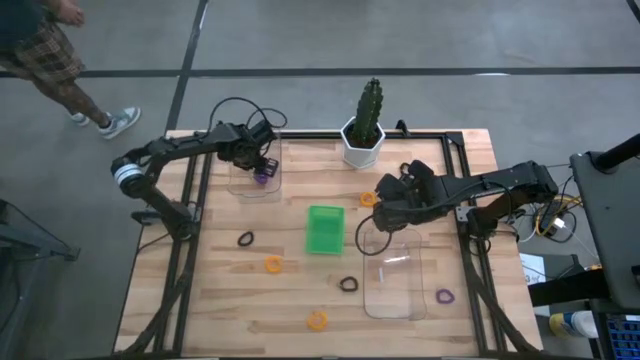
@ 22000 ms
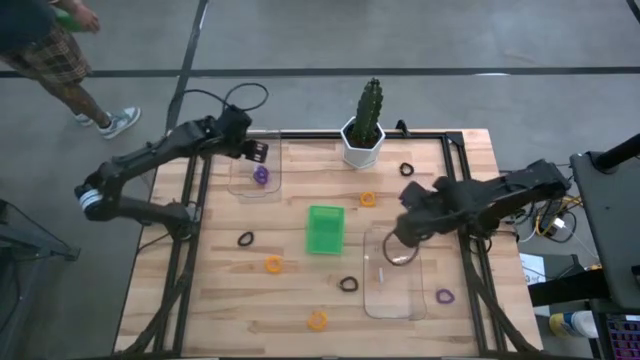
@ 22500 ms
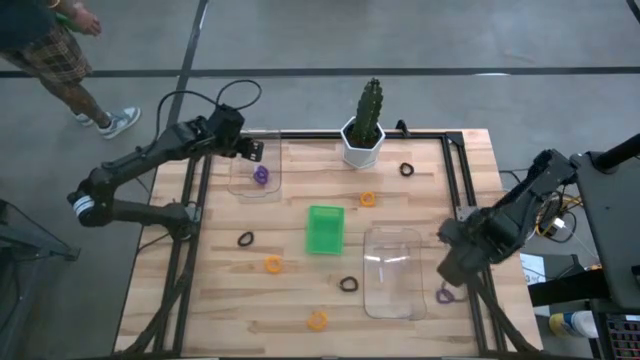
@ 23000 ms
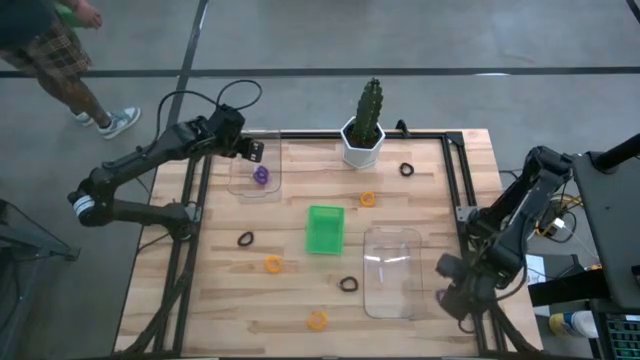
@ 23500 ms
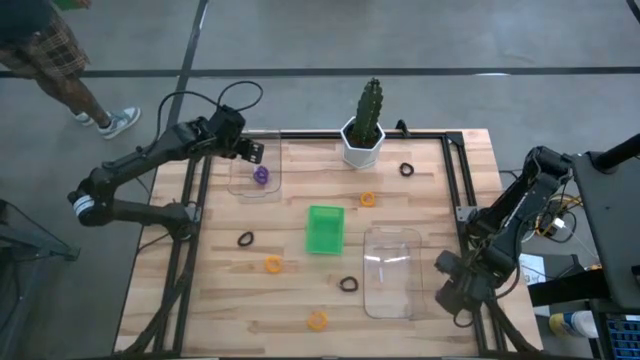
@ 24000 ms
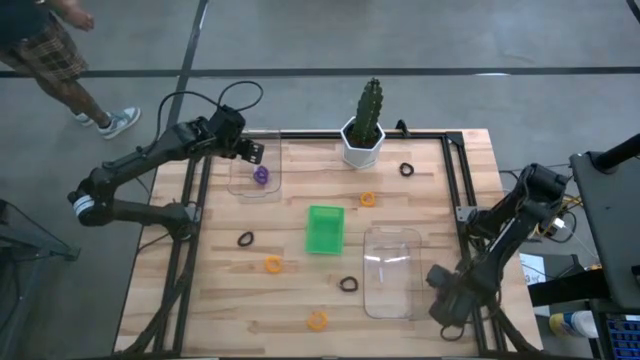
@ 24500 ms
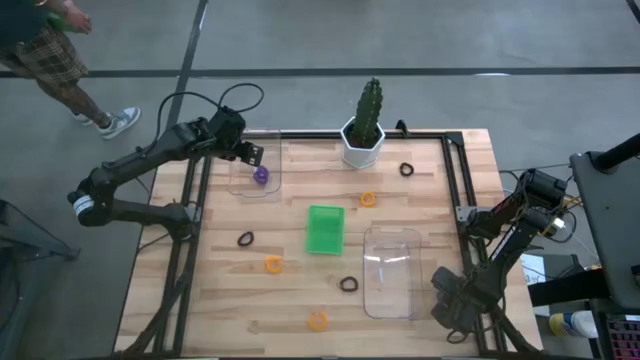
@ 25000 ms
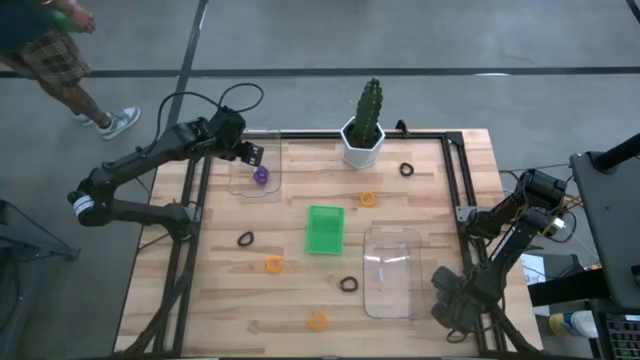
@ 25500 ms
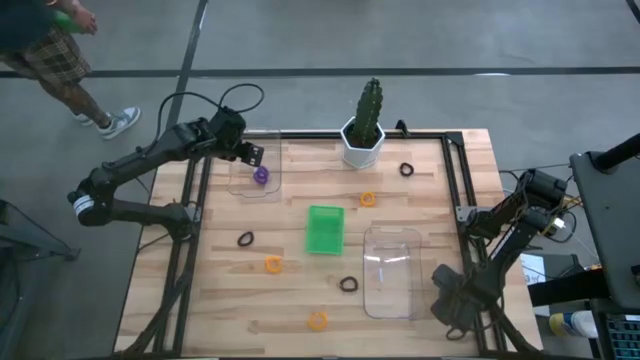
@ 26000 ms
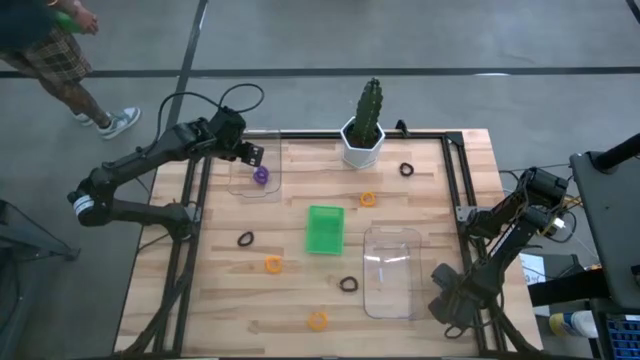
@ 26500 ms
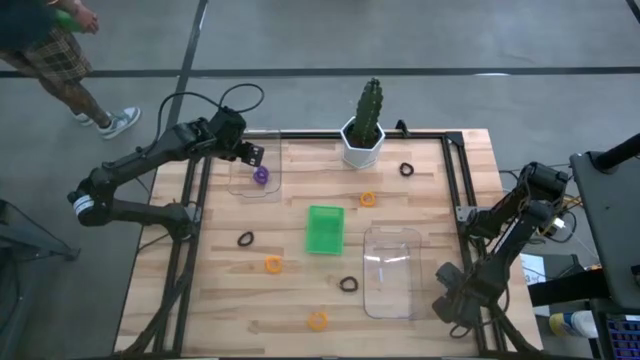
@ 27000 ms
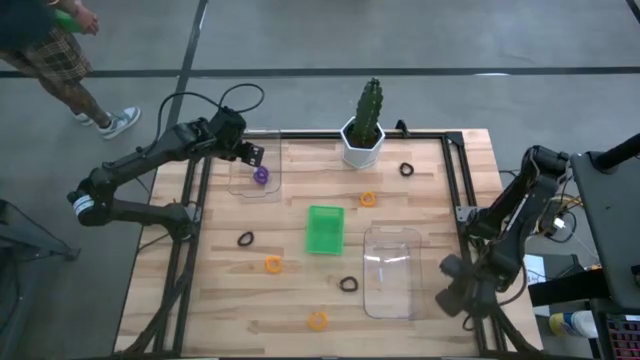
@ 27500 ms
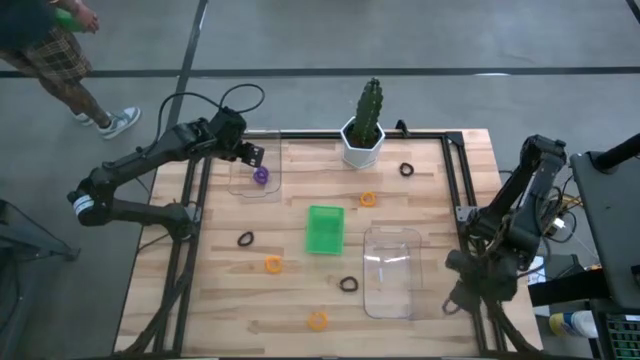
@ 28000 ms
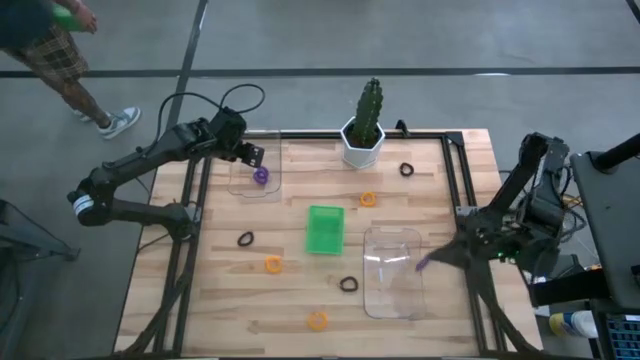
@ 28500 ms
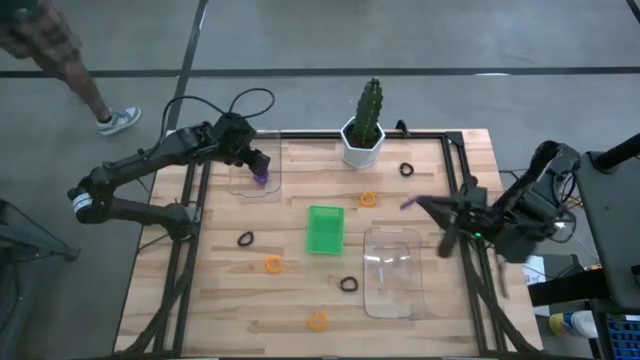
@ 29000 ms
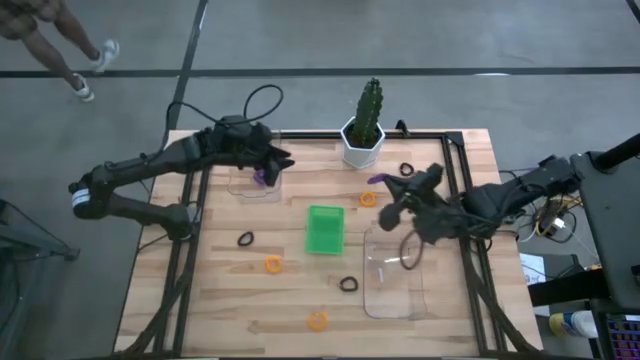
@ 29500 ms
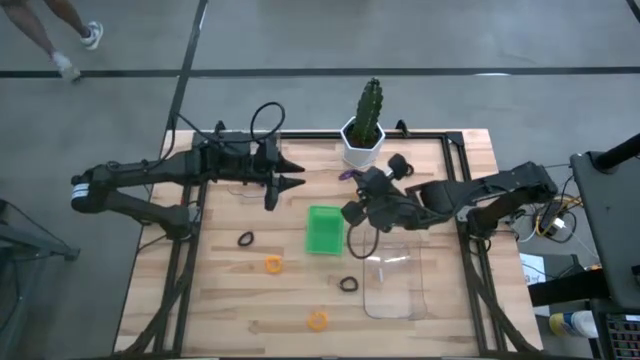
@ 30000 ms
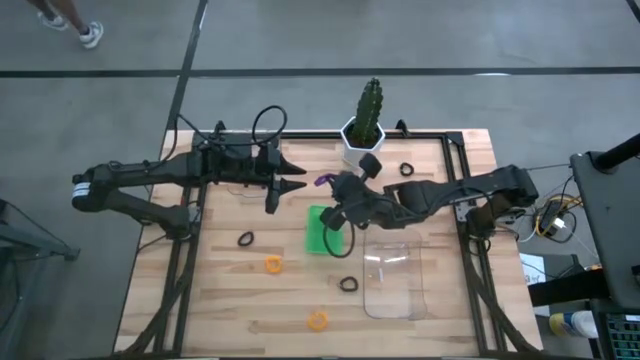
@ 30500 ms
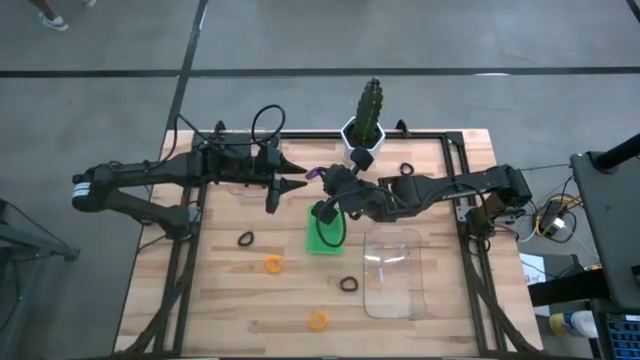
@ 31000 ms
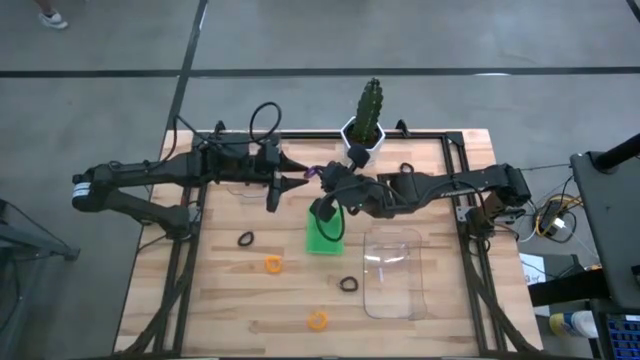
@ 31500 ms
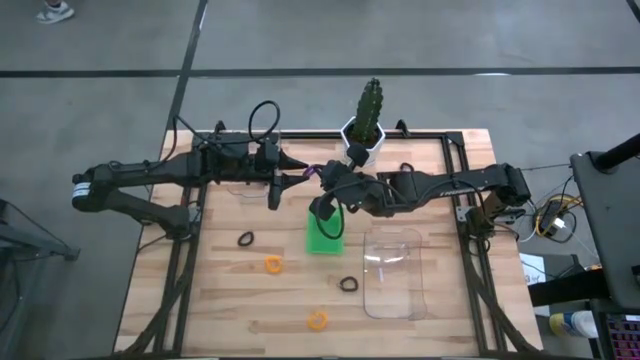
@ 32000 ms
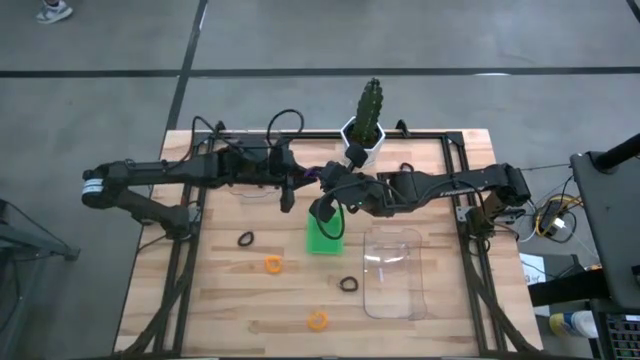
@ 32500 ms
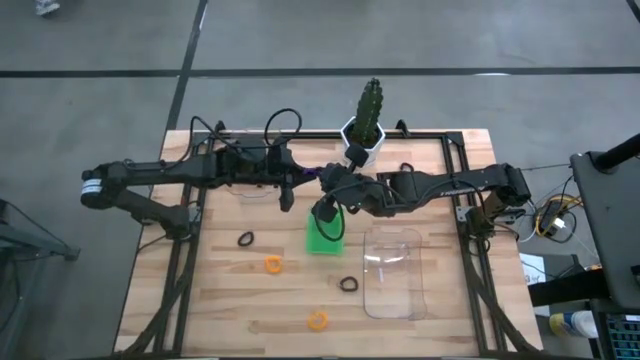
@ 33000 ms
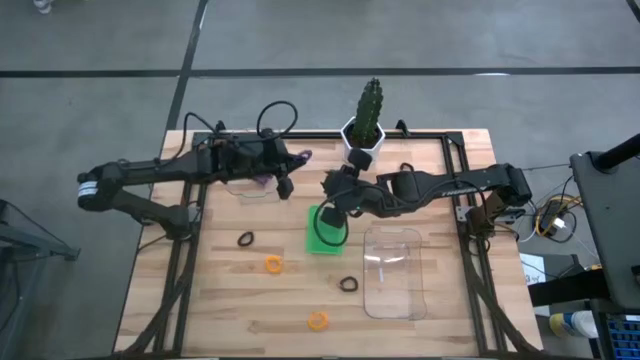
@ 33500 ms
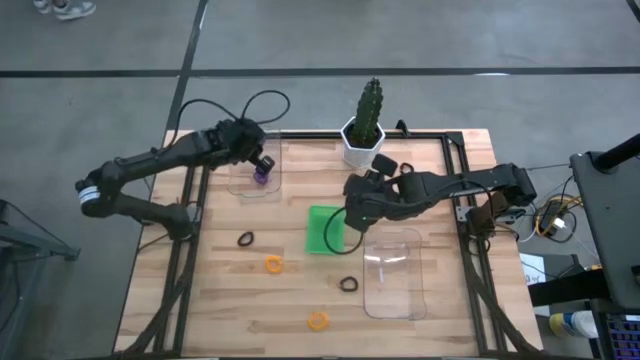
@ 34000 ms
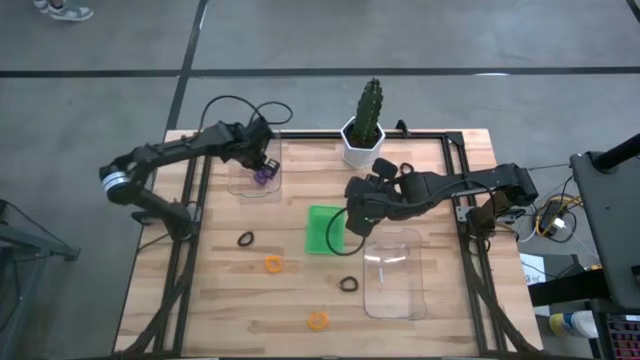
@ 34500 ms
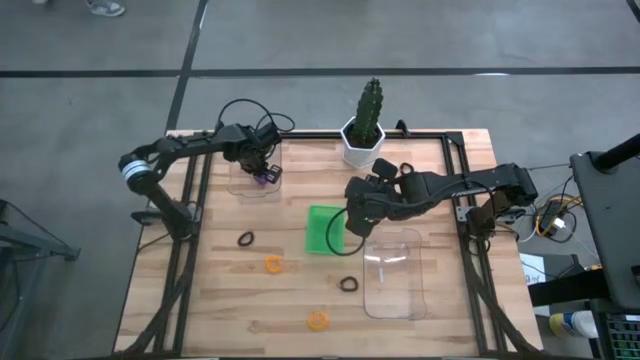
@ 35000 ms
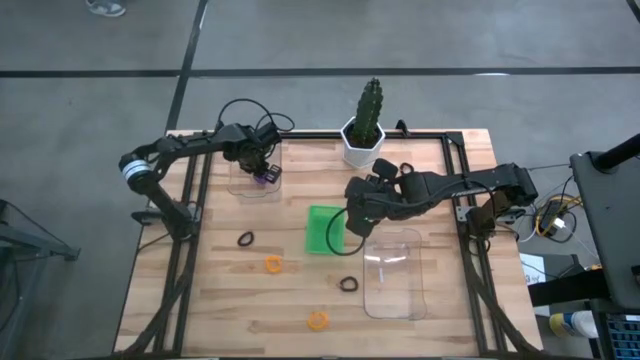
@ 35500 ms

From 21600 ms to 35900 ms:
Task: Sort spring keychains
Put the purple spring keychain into the top transparent bin

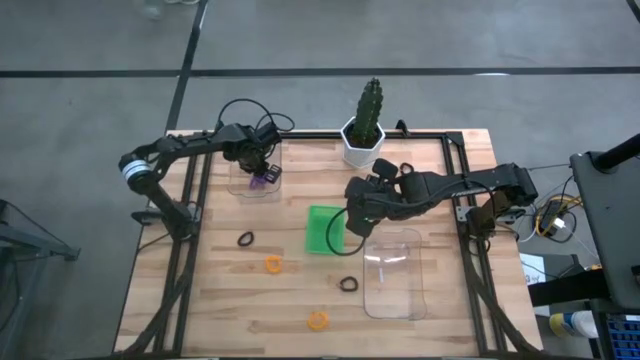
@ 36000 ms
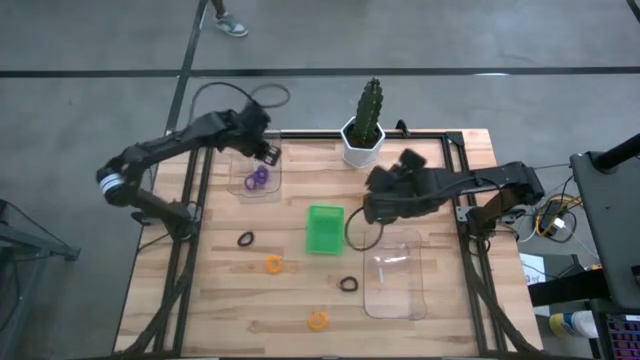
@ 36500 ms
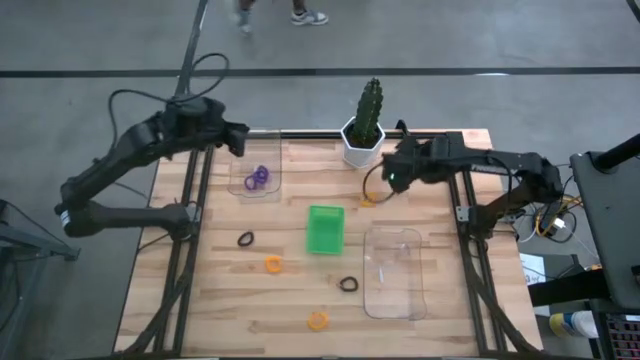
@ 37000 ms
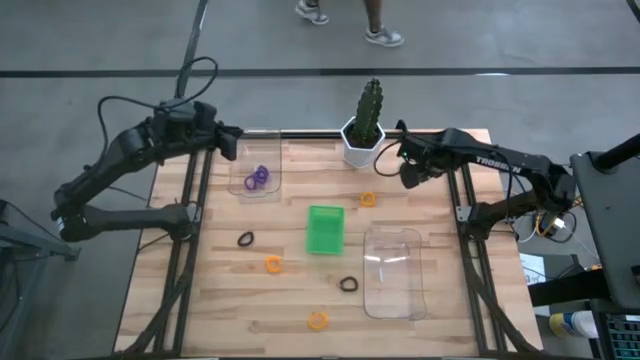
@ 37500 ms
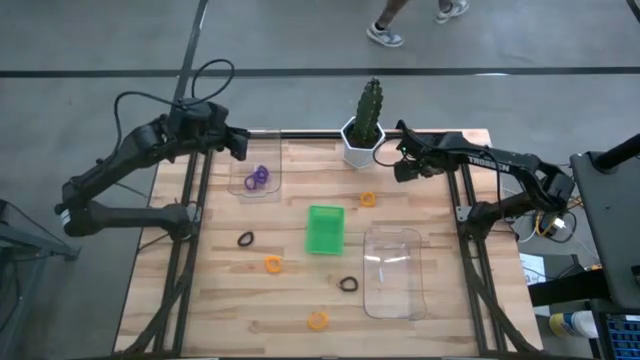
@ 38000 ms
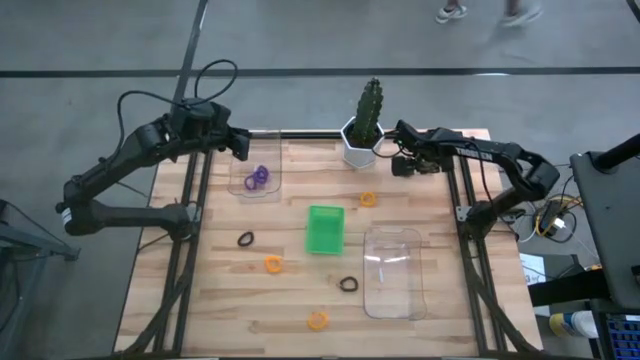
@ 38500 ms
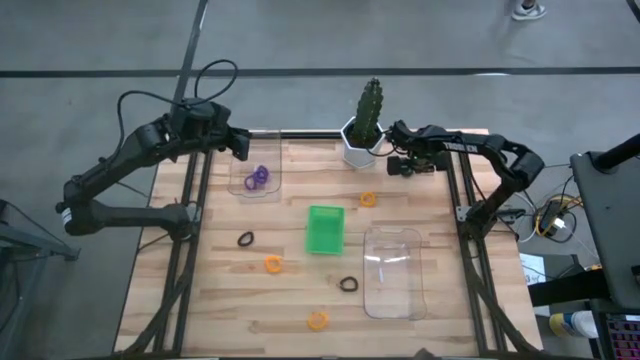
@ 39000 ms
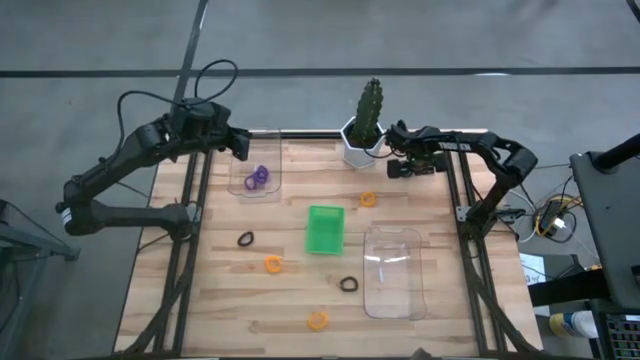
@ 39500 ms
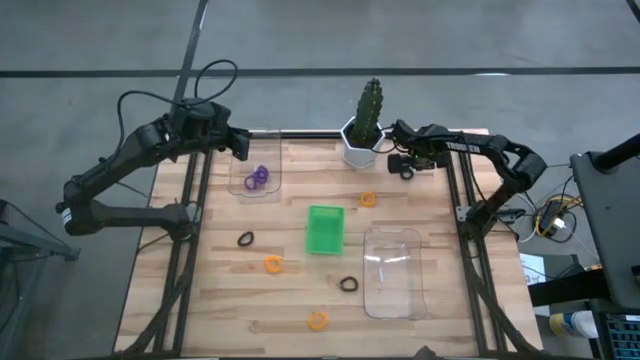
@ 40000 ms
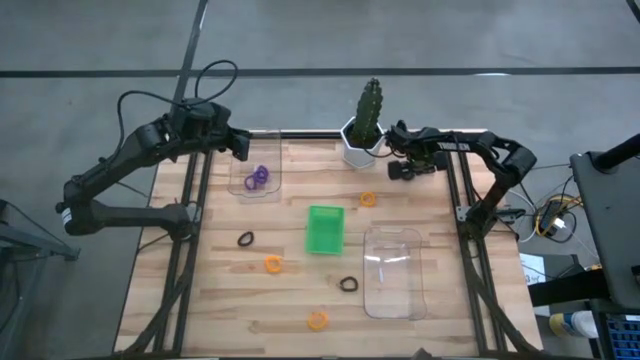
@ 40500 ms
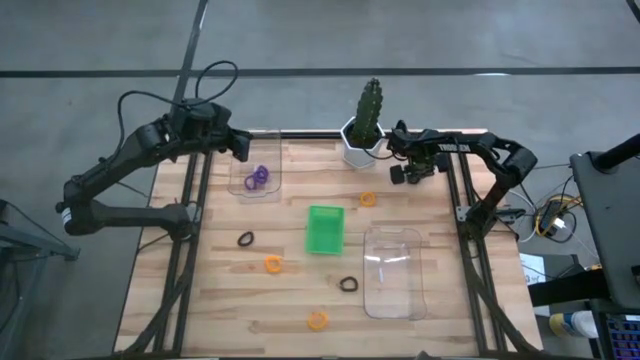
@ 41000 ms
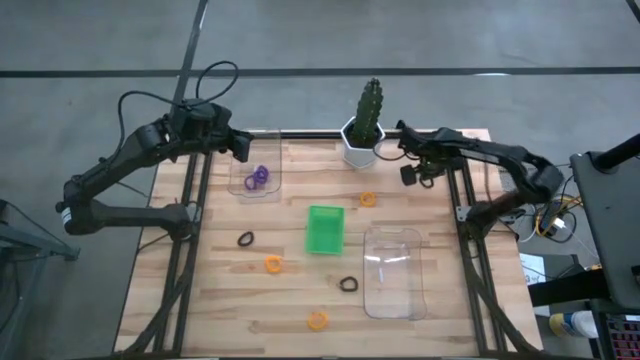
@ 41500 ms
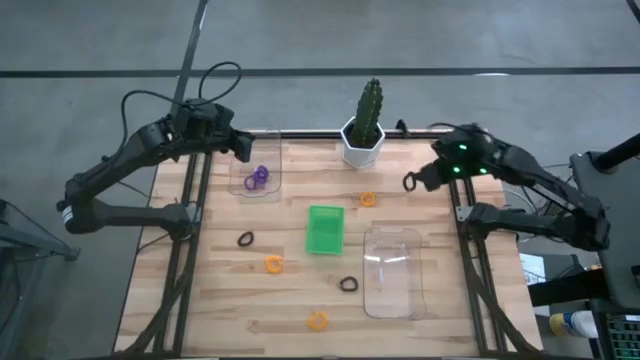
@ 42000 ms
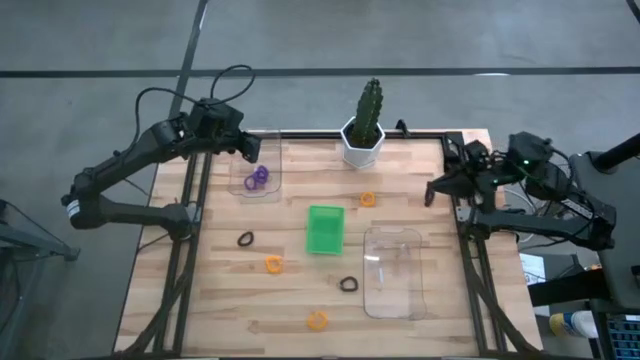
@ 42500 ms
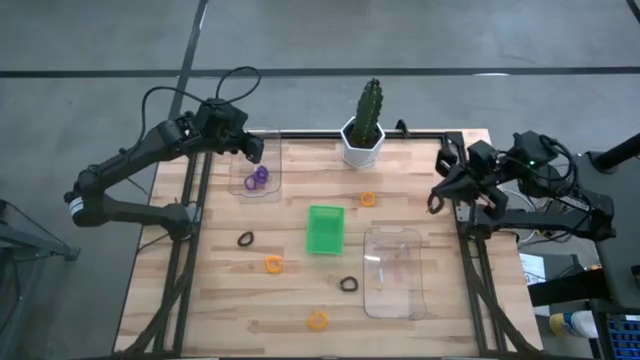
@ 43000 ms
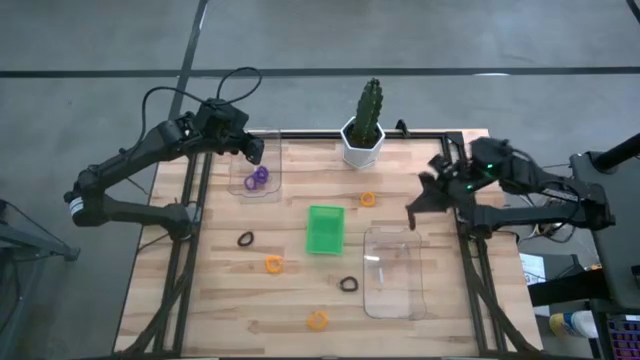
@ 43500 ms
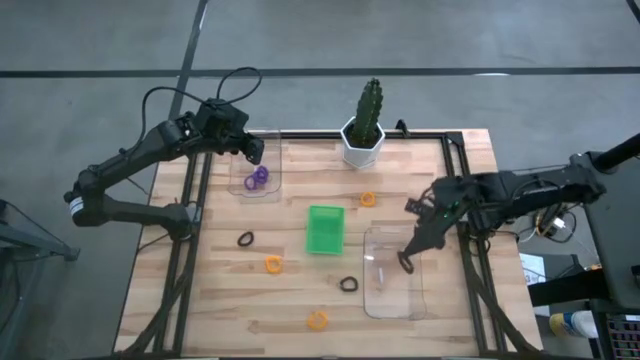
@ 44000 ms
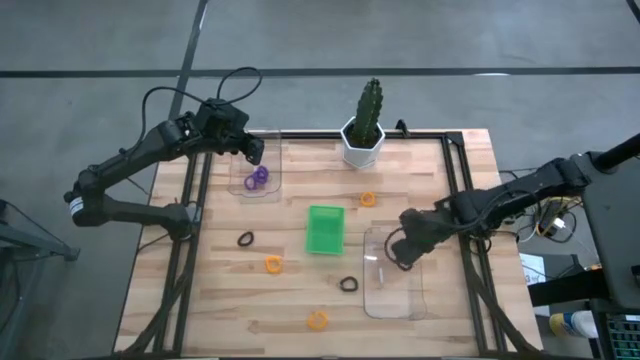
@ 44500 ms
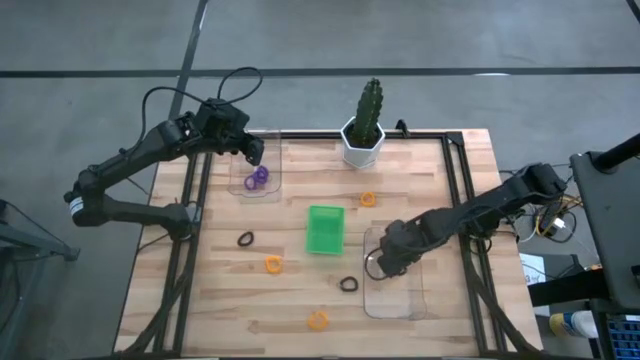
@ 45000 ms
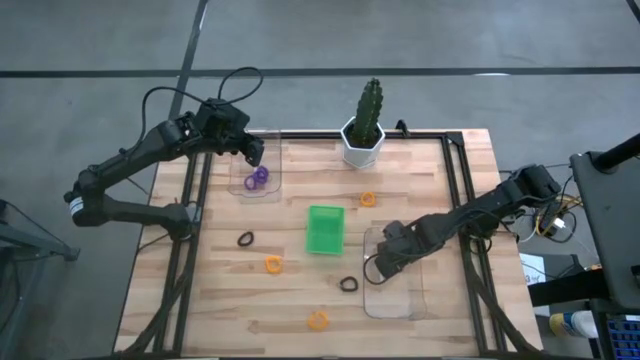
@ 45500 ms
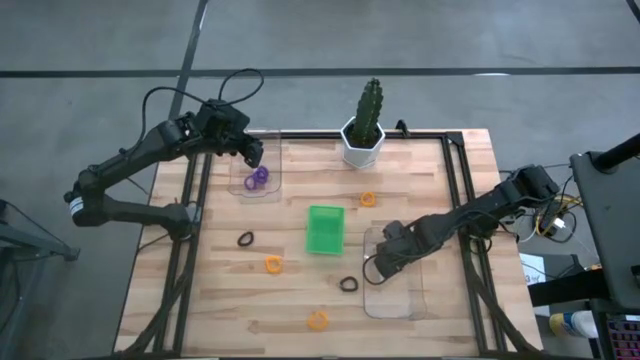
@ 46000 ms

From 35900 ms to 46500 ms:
Put the top black spring keychain into the bottom transparent bin
